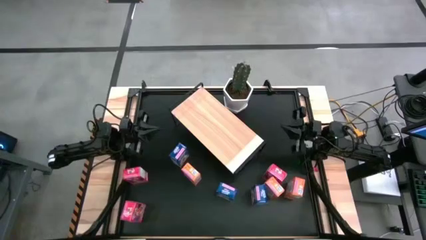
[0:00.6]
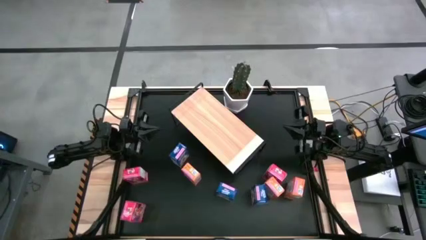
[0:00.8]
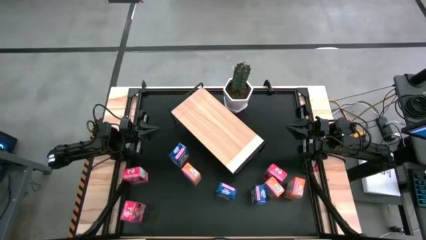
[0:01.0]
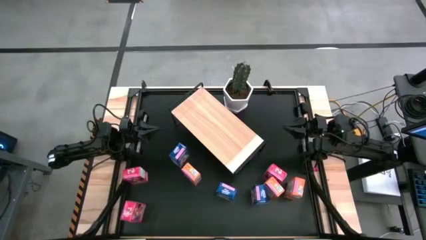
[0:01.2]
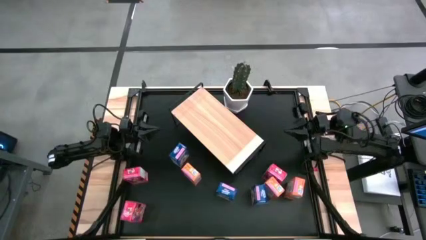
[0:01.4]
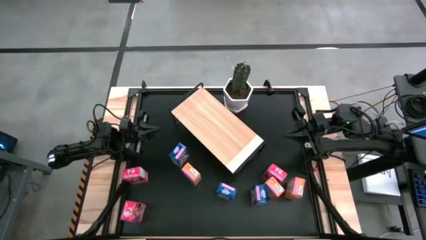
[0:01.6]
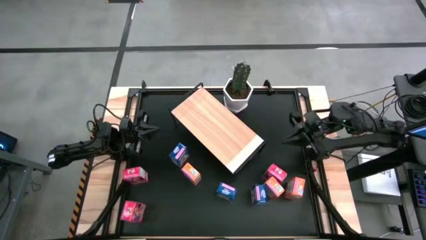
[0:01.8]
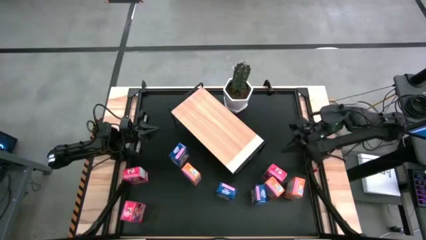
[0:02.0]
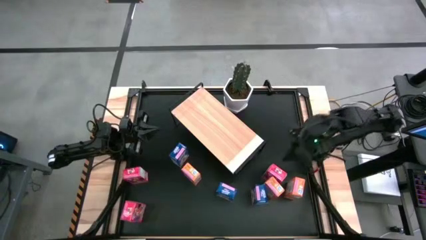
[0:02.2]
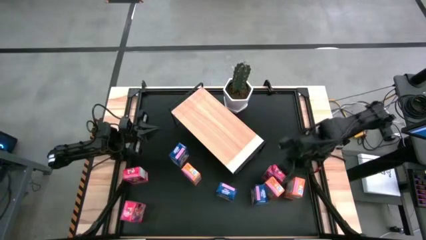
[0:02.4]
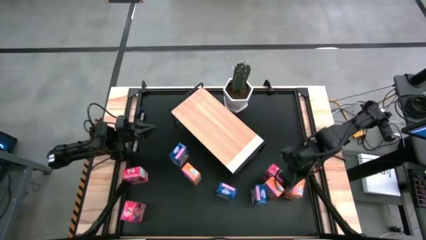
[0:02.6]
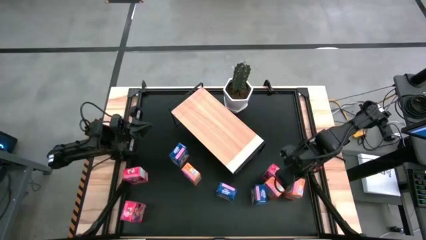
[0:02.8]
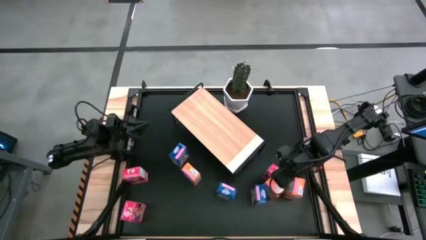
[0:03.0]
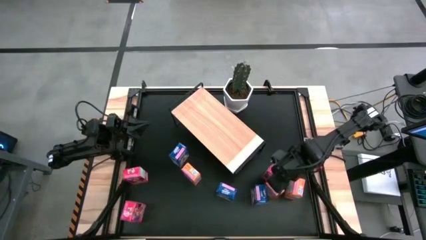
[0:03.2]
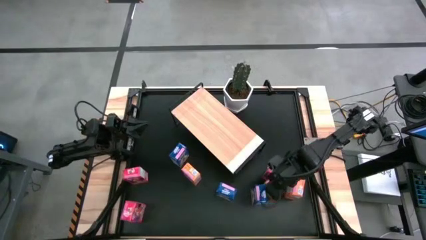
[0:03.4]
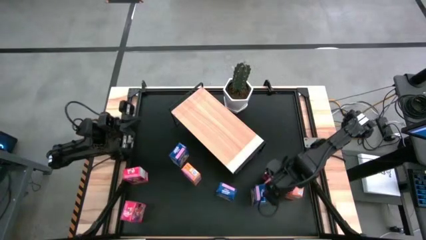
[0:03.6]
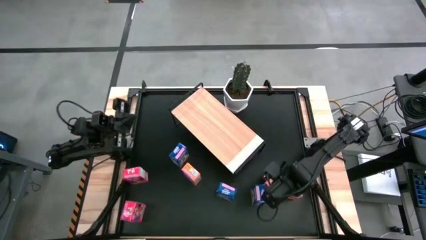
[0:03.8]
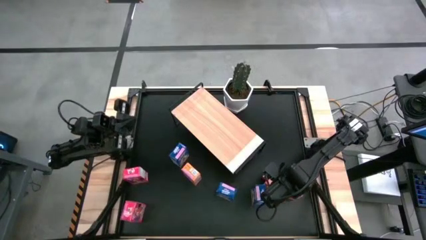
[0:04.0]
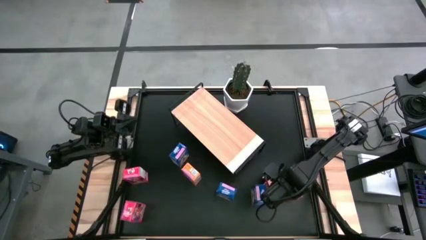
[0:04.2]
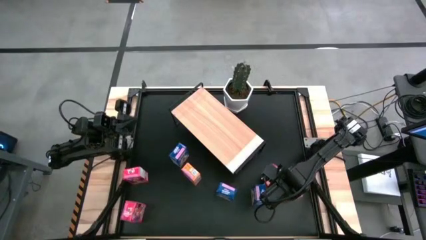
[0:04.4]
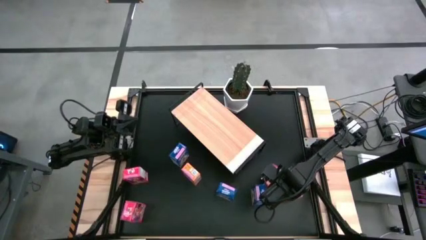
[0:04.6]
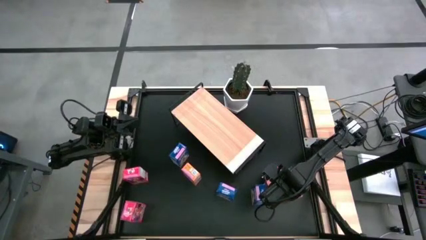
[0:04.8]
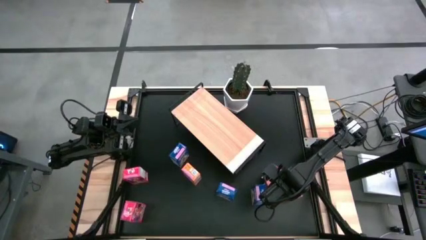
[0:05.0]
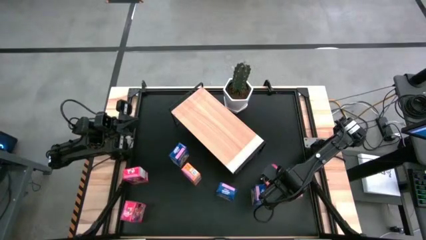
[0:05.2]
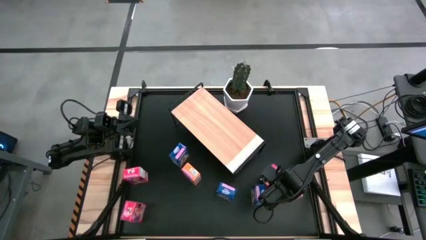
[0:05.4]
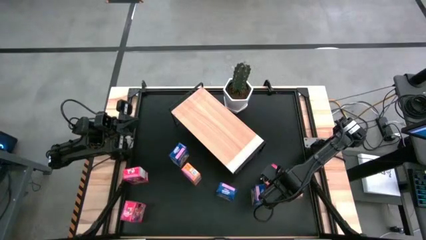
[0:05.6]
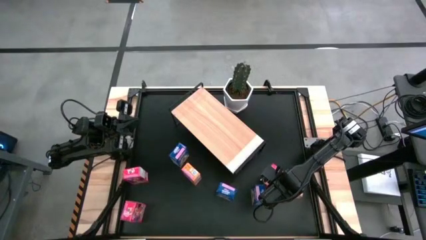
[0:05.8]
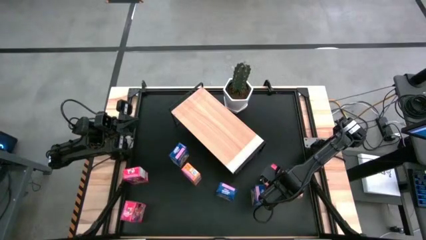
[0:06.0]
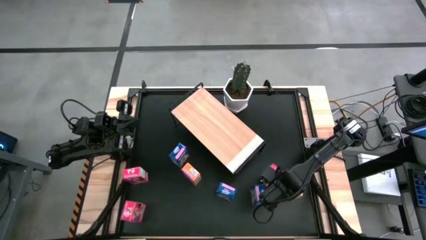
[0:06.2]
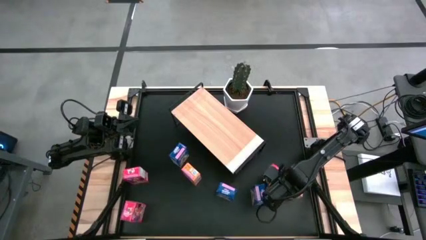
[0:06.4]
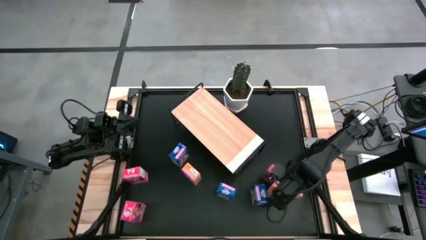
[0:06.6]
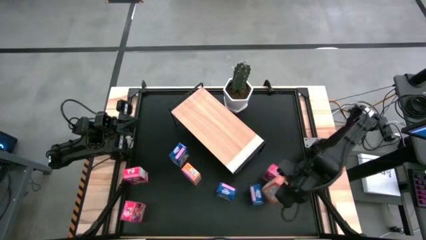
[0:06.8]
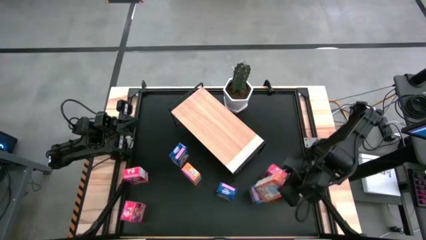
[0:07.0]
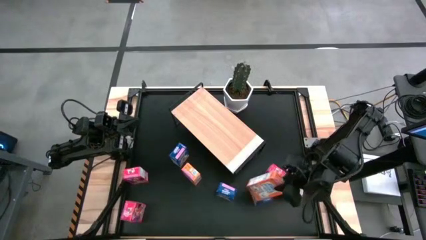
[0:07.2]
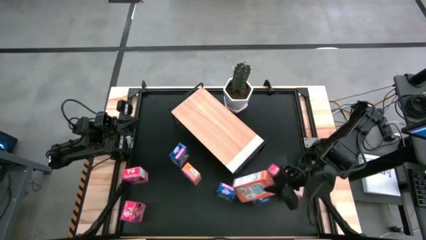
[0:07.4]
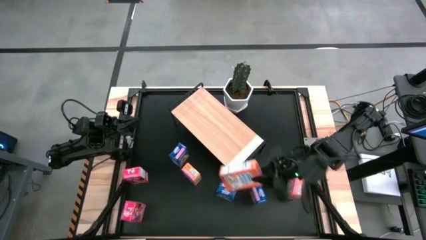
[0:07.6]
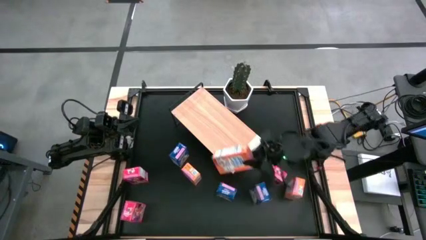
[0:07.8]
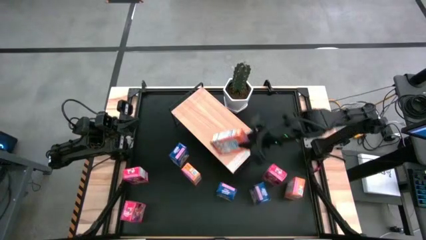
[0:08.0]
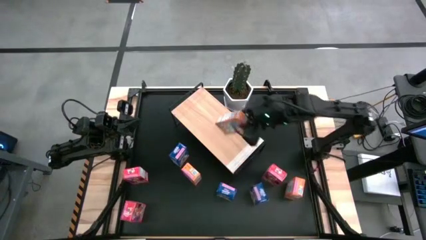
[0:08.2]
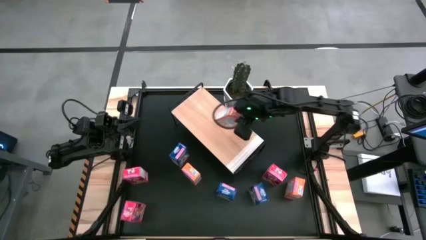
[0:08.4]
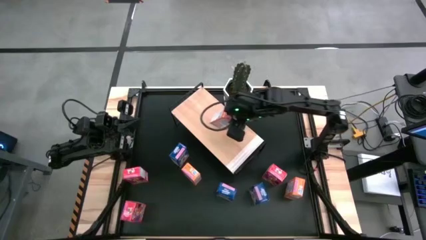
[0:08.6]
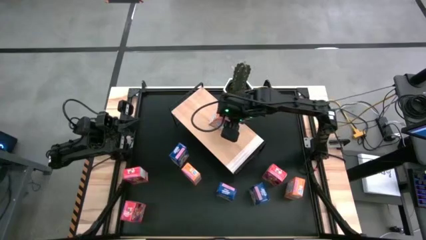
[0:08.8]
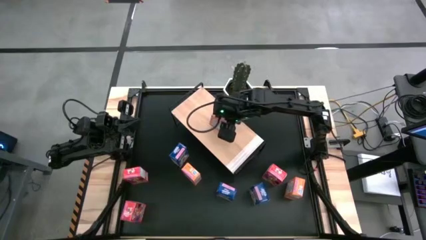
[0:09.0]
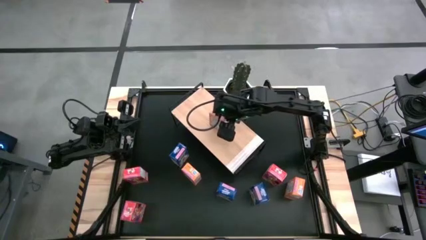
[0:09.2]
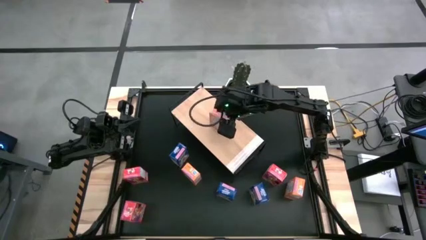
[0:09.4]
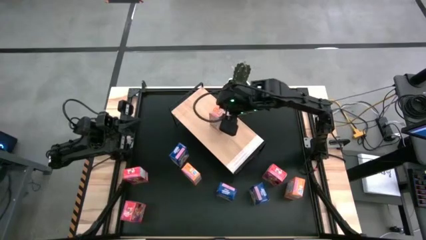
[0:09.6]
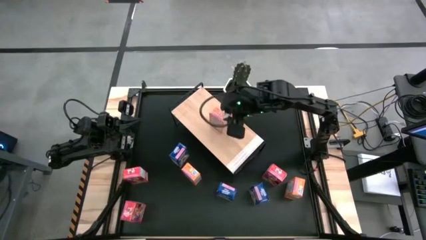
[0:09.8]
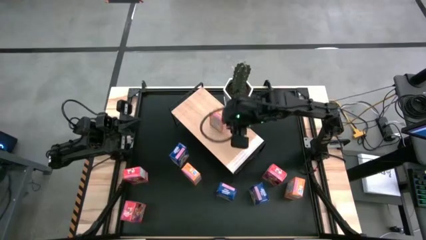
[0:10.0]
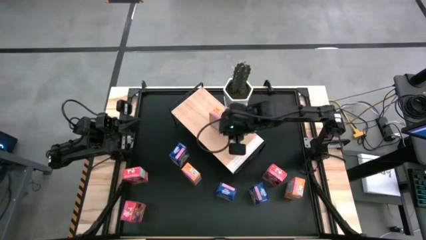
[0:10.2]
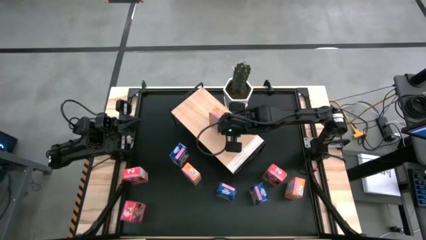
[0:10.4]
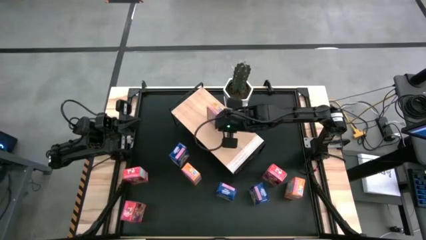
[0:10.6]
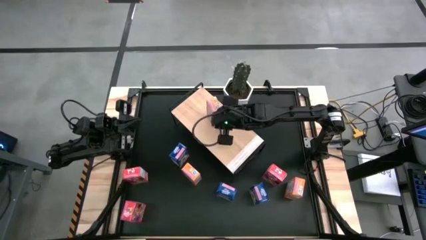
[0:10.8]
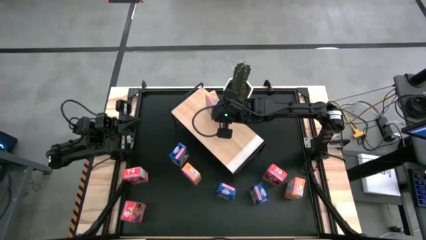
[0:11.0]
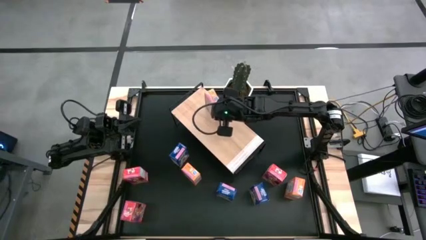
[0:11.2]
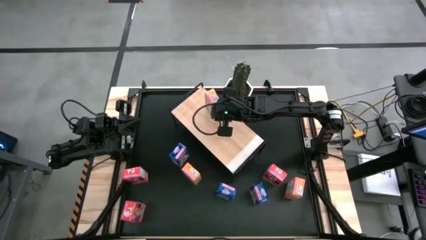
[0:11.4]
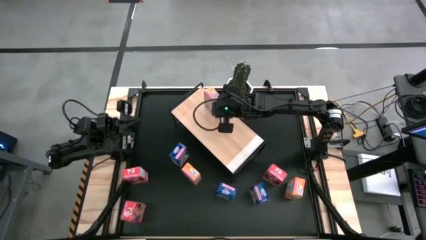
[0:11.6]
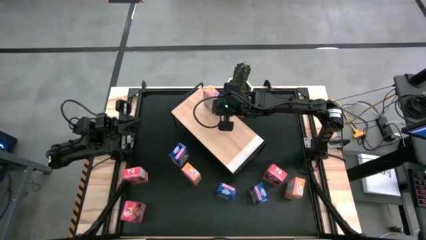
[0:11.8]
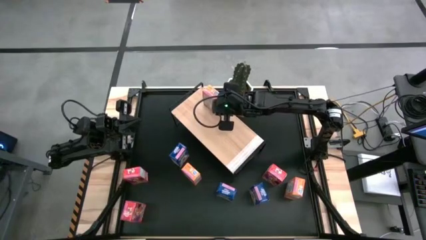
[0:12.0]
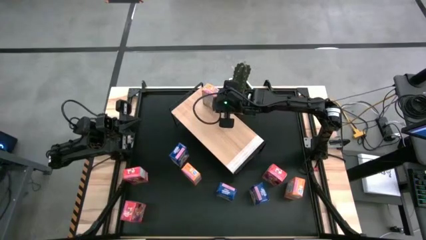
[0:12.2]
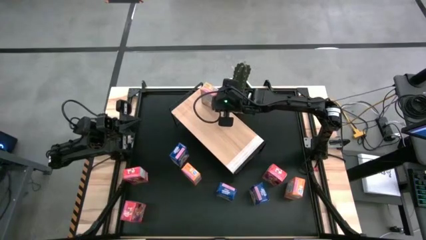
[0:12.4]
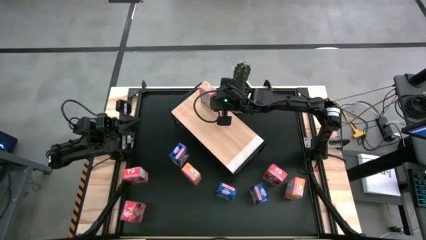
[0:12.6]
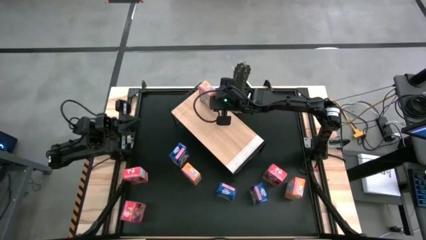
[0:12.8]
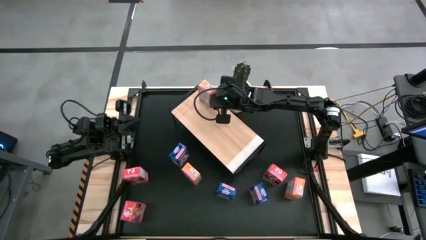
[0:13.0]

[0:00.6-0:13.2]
Task: Stack cereal on shelf
Put the middle orange cereal box on the shelf
